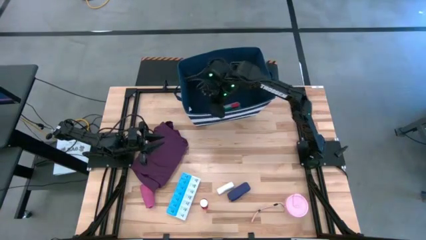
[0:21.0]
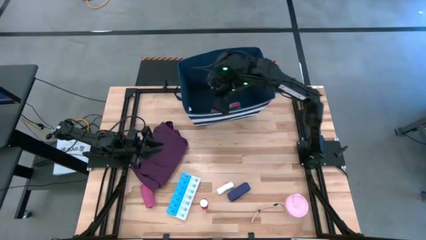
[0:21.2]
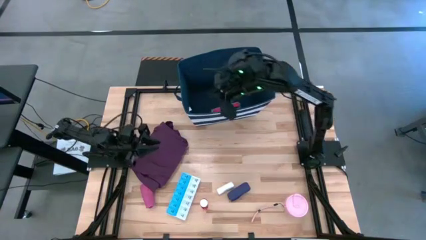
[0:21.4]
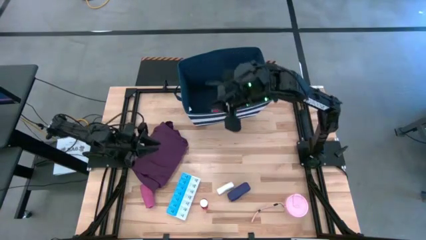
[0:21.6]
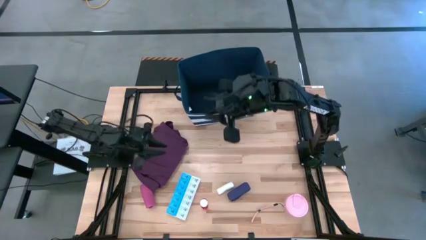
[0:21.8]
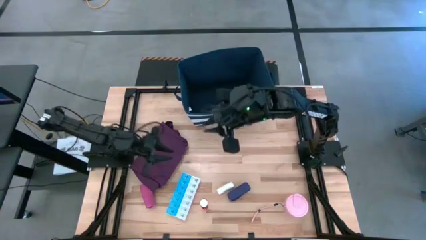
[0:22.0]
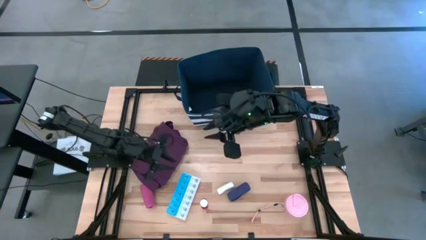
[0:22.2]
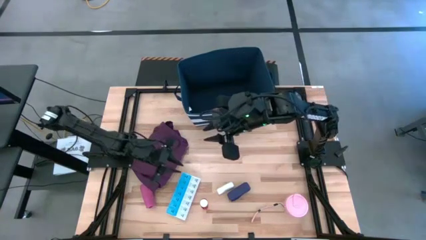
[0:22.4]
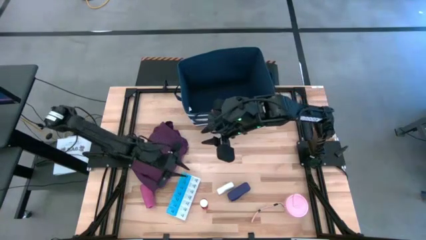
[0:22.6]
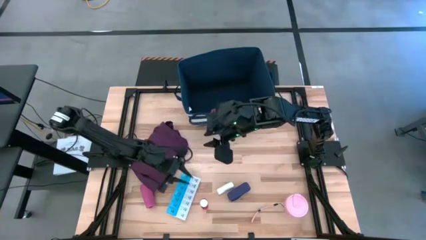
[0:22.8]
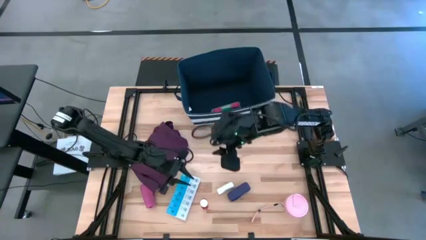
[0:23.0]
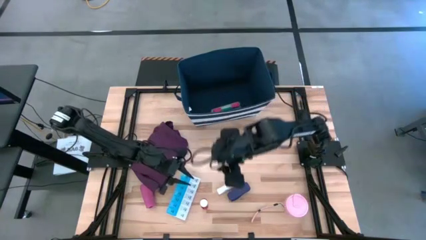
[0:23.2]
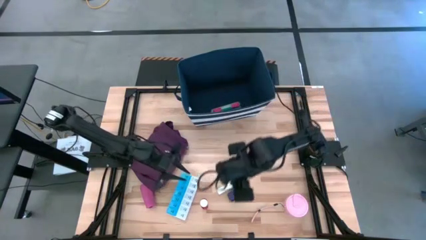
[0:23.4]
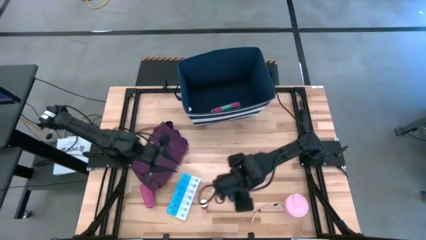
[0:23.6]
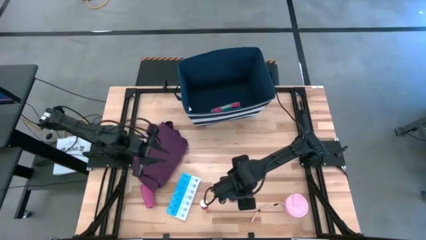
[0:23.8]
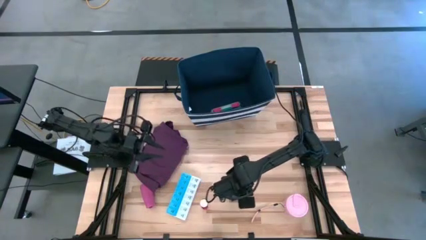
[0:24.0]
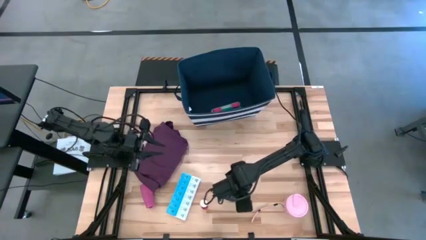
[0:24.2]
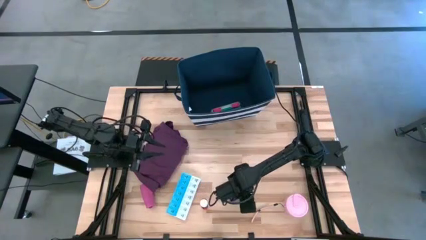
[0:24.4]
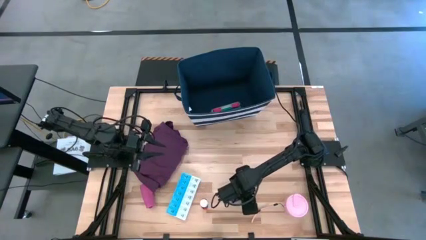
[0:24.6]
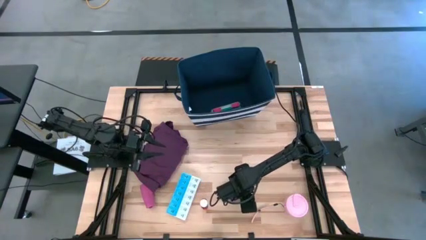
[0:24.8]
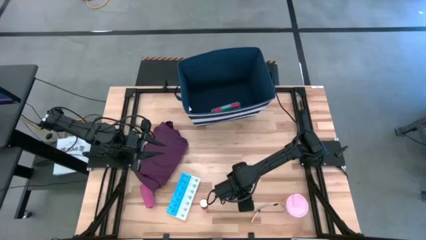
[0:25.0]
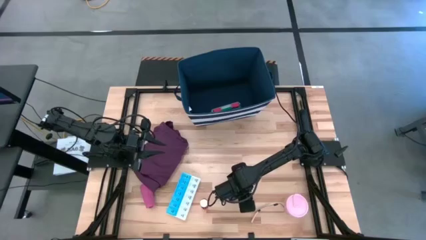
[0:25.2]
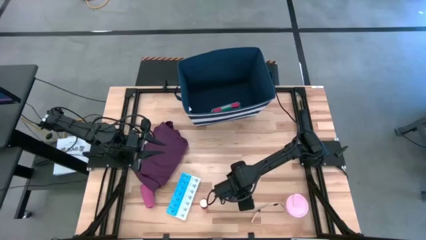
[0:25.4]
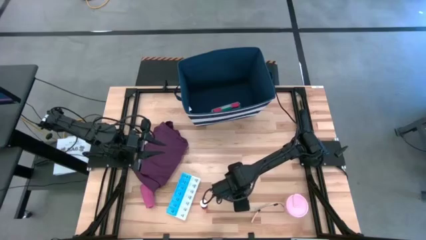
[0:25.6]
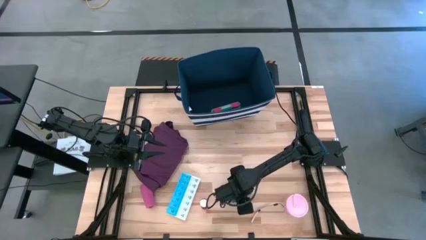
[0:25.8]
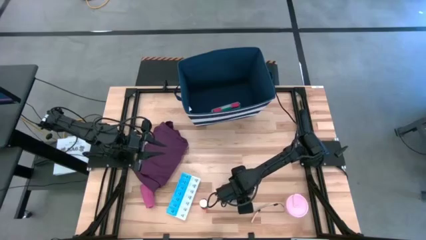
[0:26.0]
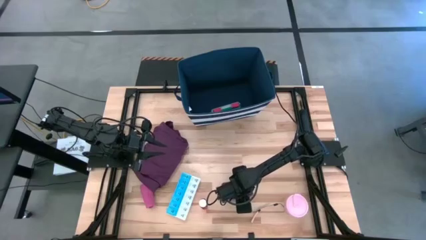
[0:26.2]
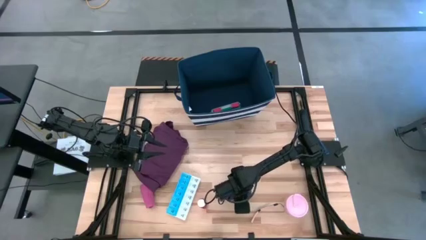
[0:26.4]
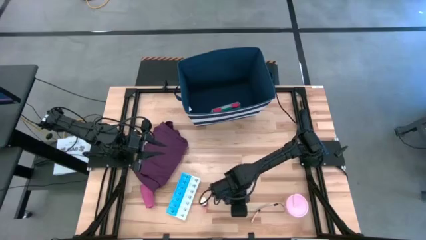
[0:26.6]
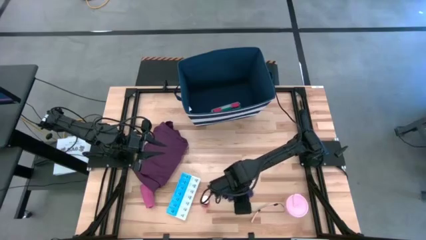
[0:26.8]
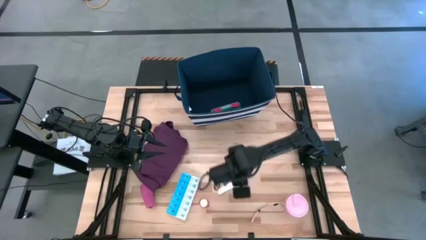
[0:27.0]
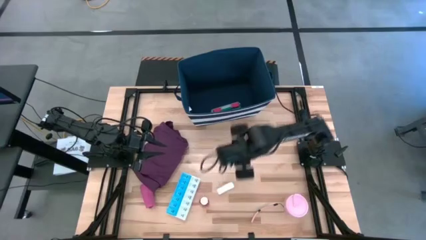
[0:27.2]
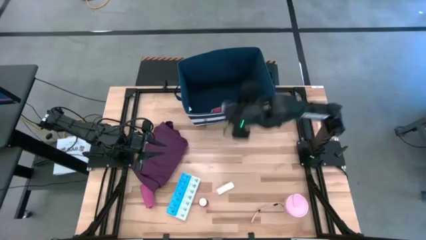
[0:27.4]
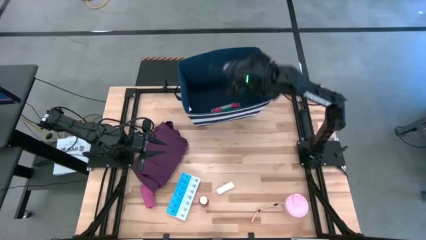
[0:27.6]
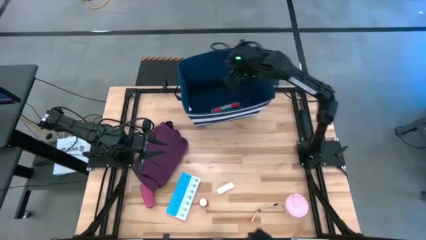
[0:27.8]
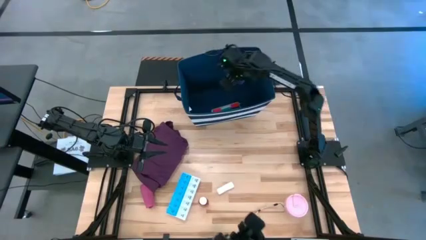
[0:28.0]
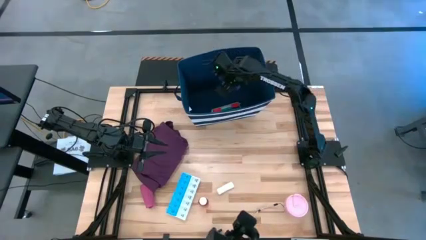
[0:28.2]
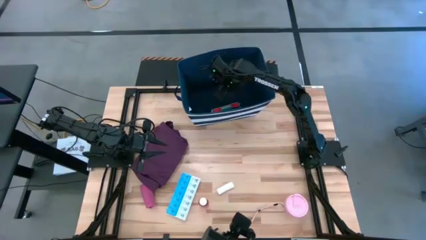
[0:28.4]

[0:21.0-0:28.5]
Task: Pick & place medical supplies in basket/bin
Put the blue bandage into the blue bin

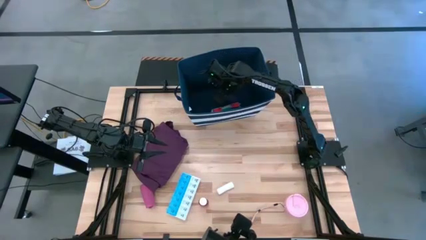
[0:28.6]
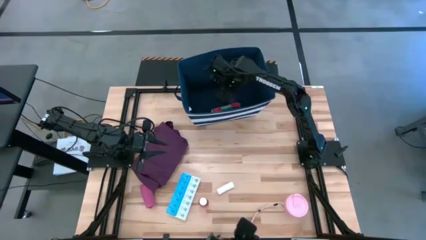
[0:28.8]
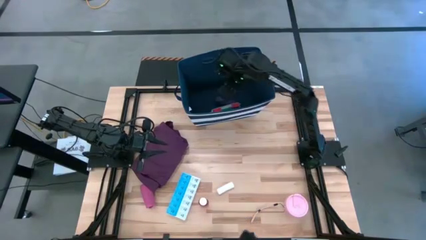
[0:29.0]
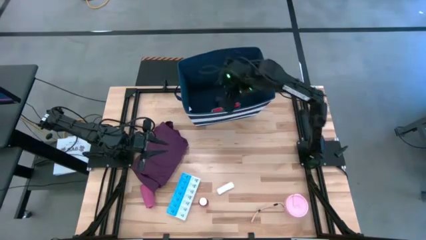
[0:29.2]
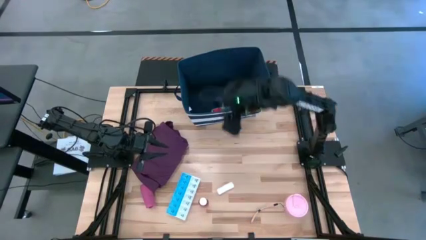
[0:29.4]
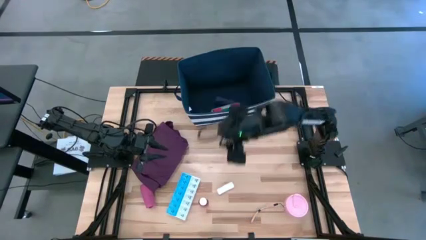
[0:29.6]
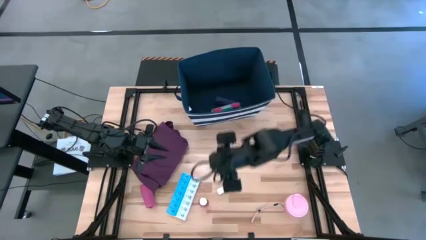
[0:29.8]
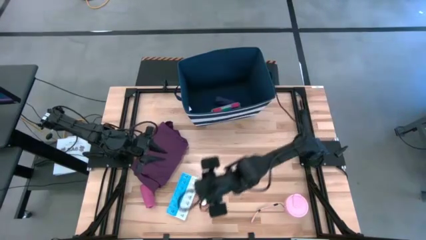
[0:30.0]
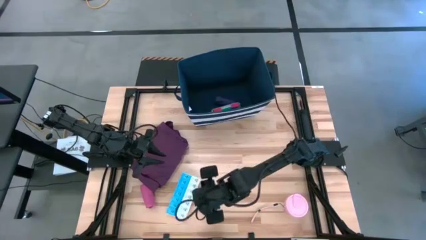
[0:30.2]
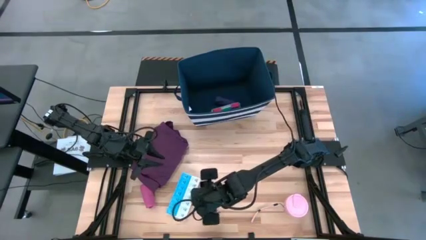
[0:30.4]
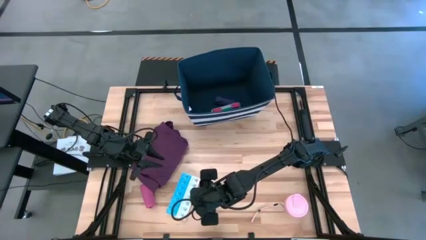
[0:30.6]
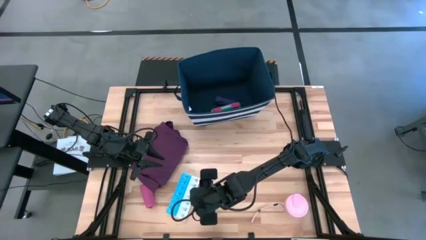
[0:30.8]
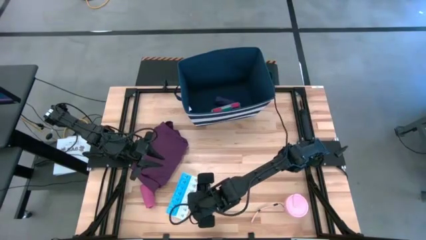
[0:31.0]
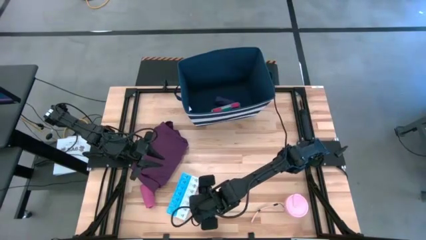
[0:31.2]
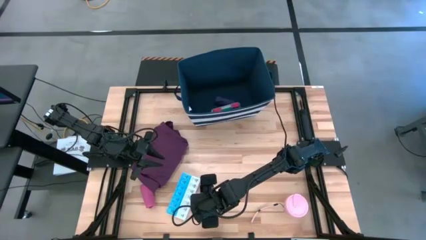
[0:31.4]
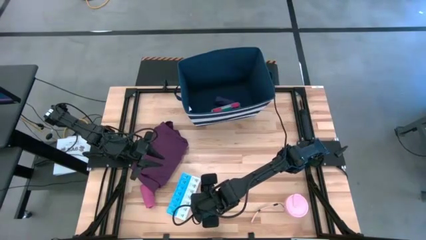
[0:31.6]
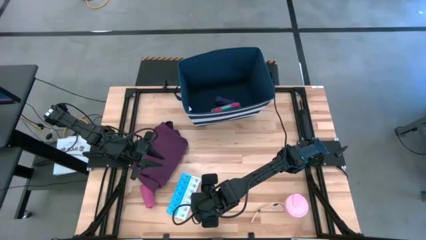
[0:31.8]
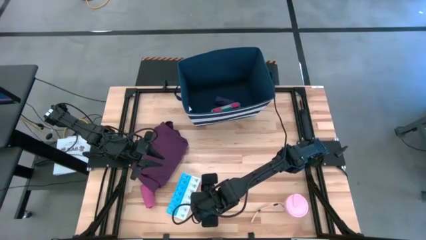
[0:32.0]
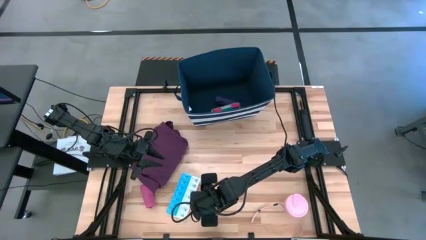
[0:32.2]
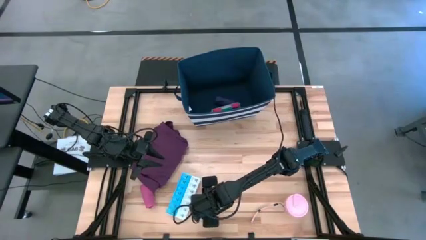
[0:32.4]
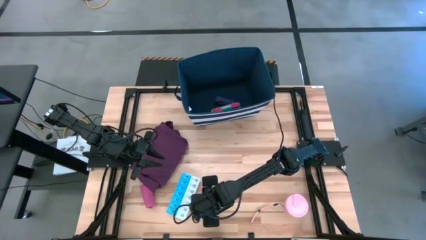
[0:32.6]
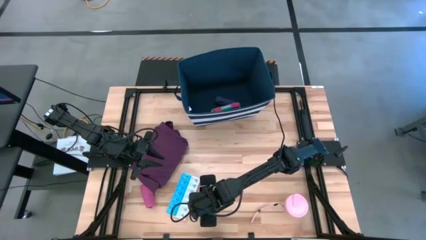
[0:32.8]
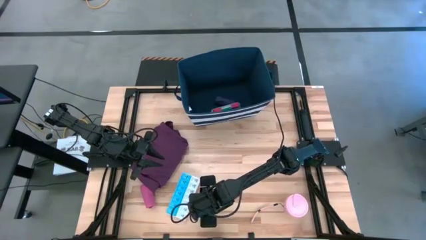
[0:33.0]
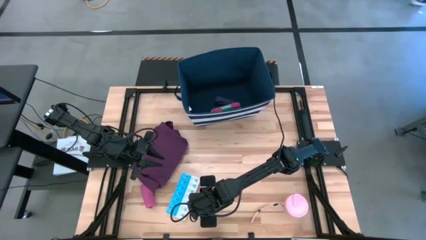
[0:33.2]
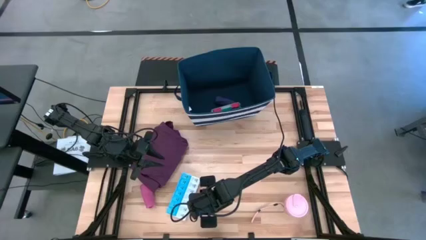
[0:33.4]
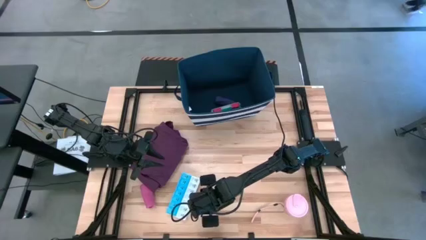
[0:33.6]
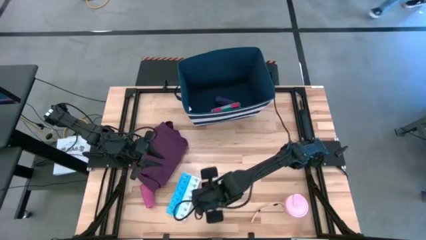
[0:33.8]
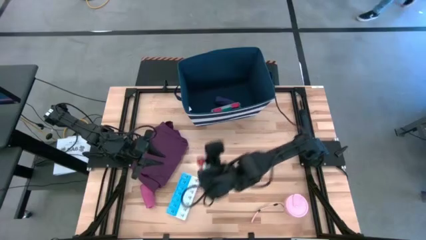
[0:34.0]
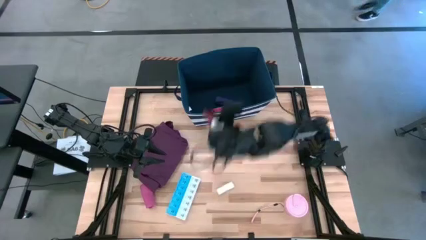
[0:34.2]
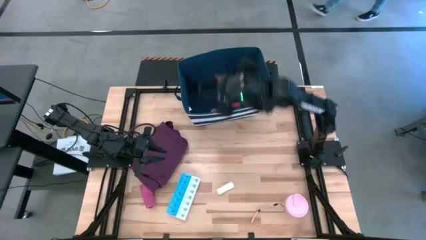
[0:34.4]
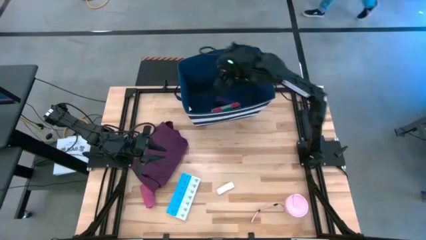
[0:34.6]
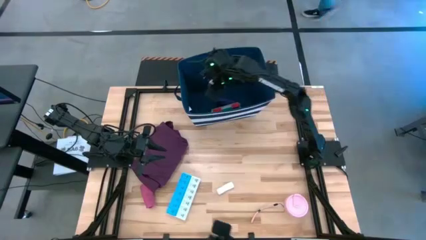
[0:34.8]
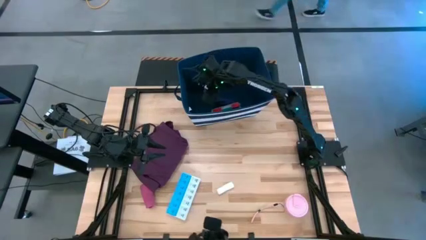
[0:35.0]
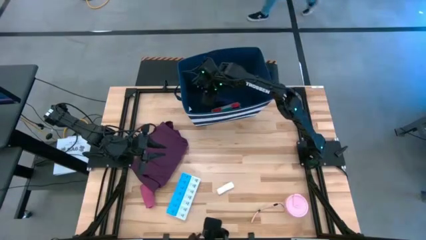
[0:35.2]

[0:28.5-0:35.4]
Put the red pill bottle into the blue bin

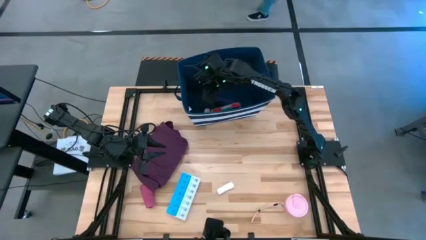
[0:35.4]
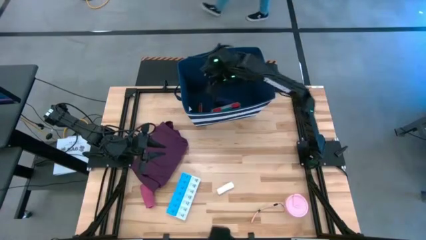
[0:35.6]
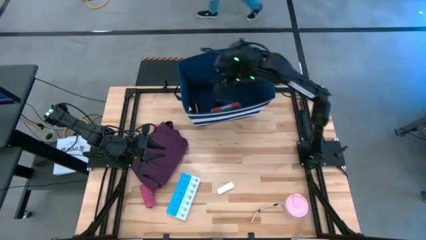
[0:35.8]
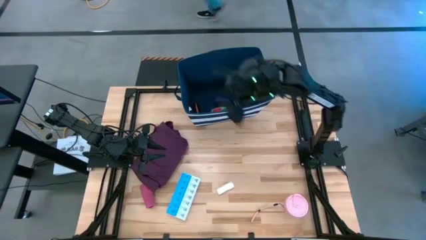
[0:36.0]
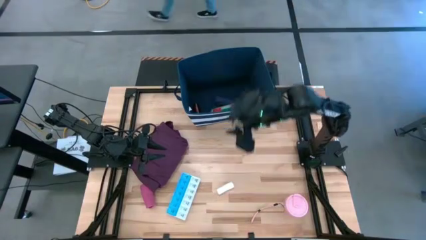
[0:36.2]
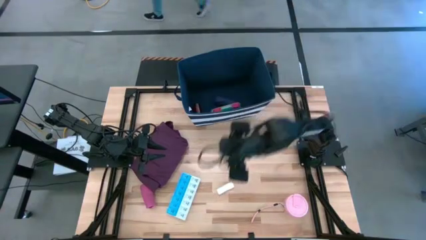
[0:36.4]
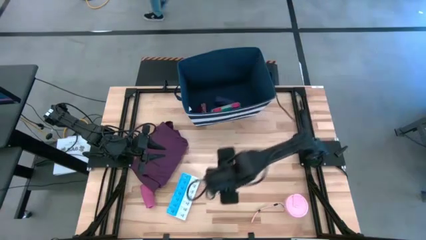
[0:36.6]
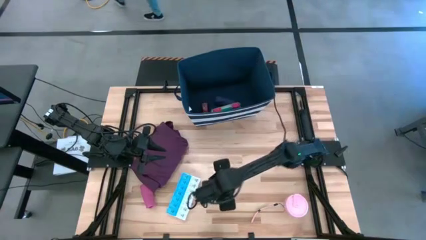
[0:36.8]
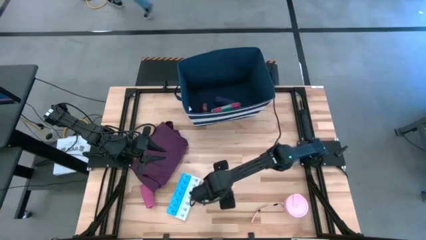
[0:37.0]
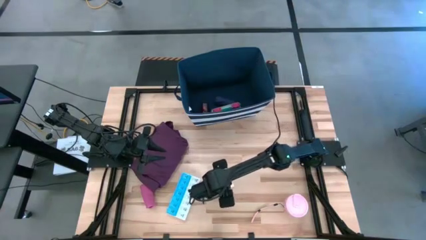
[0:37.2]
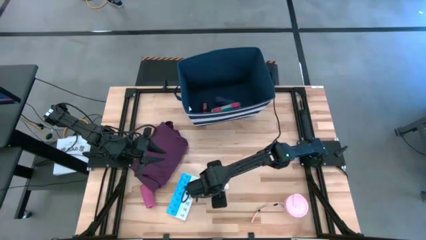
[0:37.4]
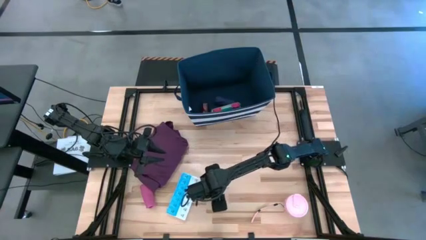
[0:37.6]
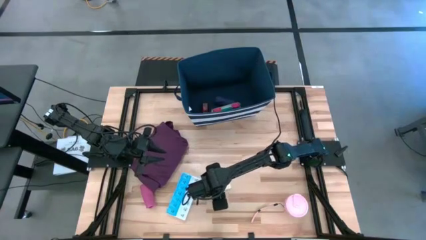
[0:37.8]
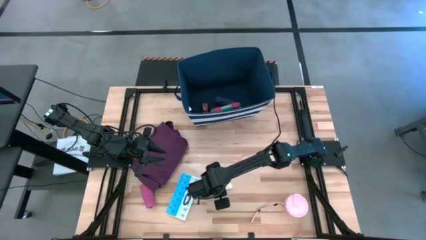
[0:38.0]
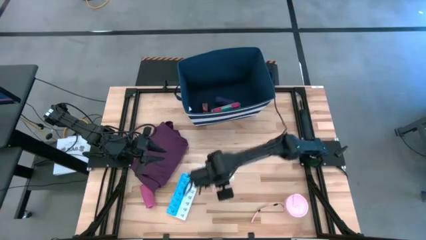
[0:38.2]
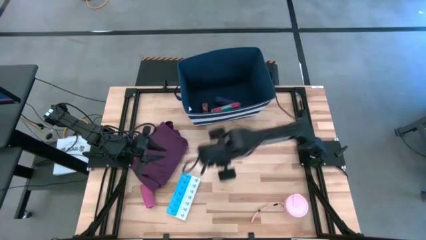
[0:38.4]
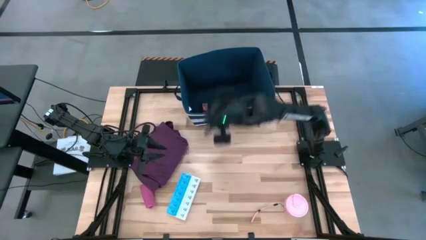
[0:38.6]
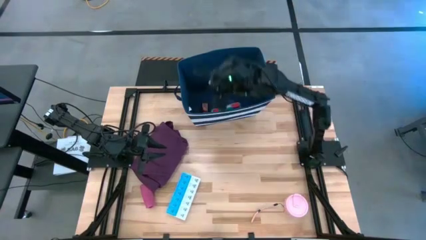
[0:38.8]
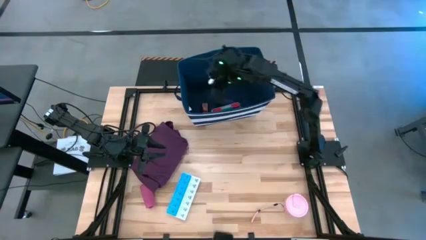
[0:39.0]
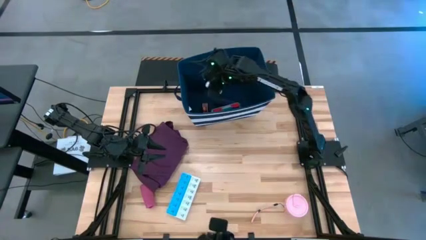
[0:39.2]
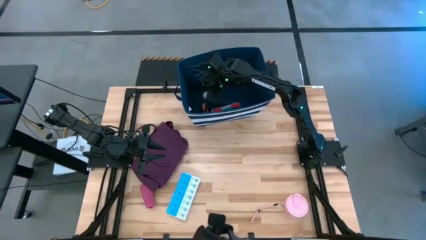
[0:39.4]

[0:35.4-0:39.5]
Put the white rolled gauze into the blue bin
